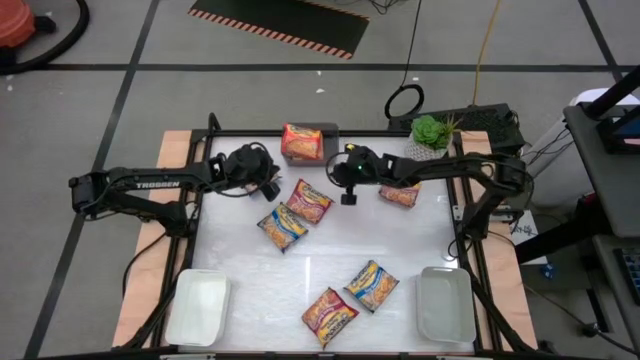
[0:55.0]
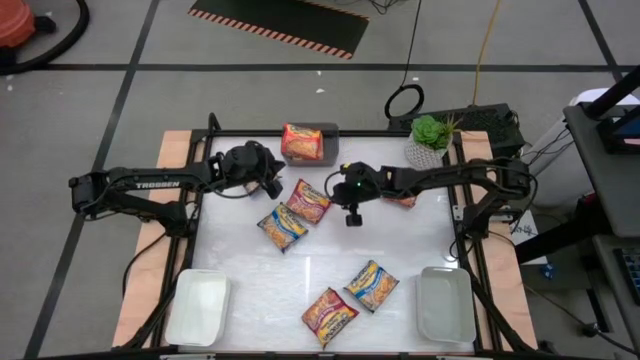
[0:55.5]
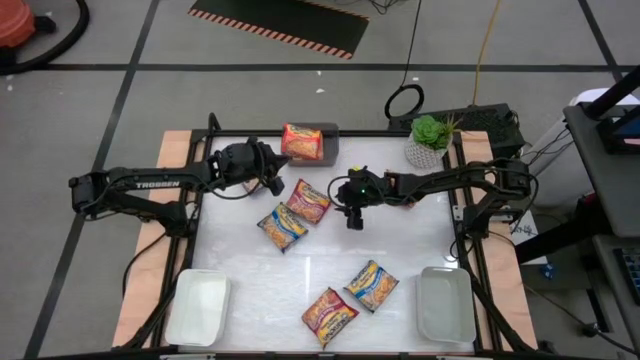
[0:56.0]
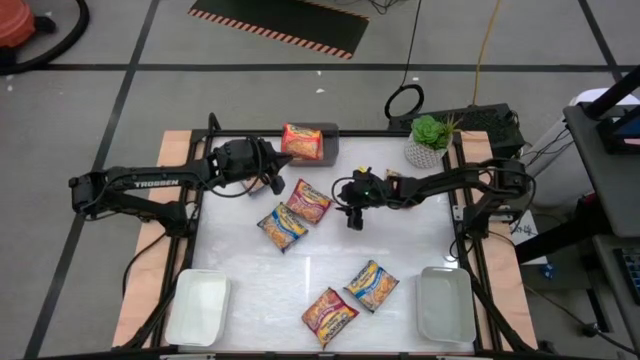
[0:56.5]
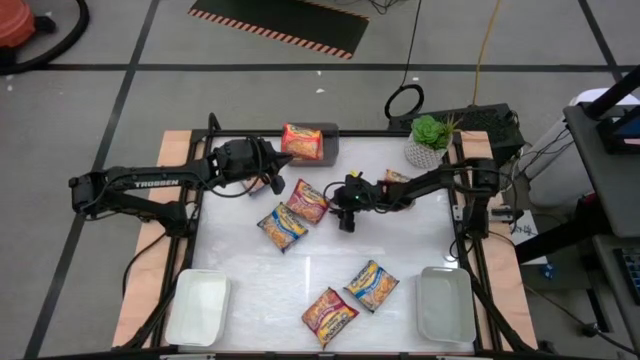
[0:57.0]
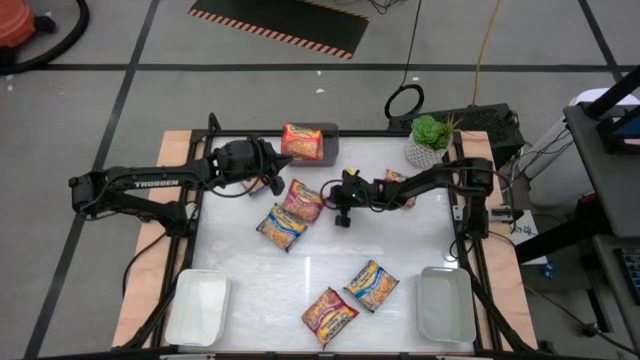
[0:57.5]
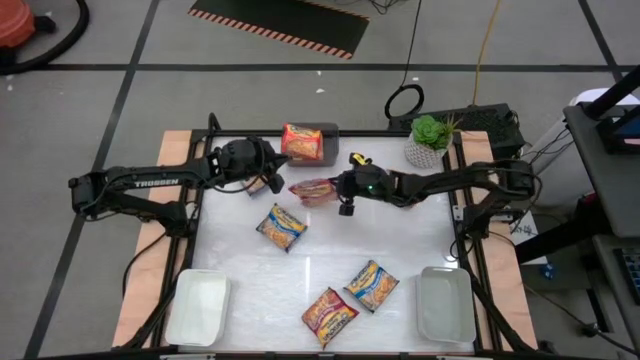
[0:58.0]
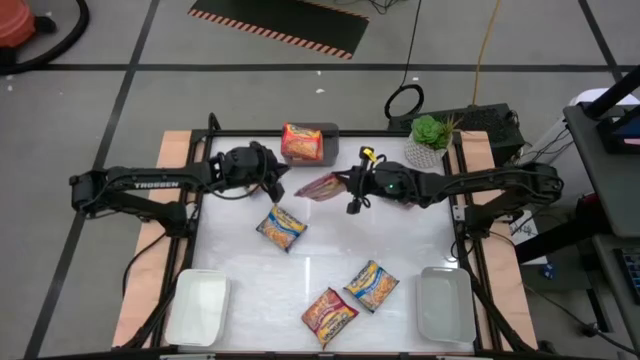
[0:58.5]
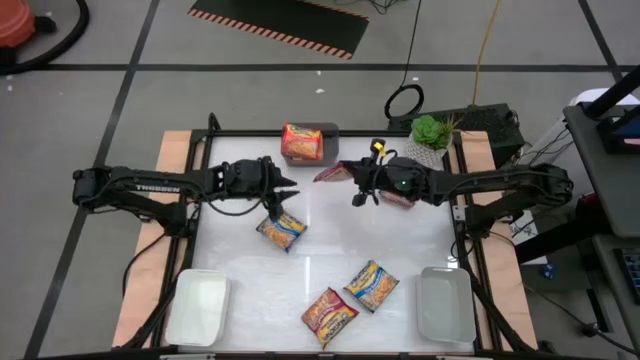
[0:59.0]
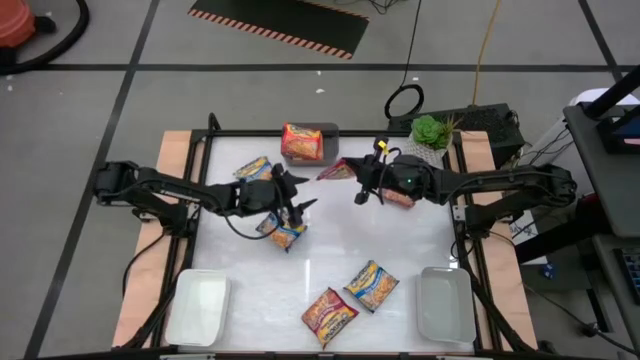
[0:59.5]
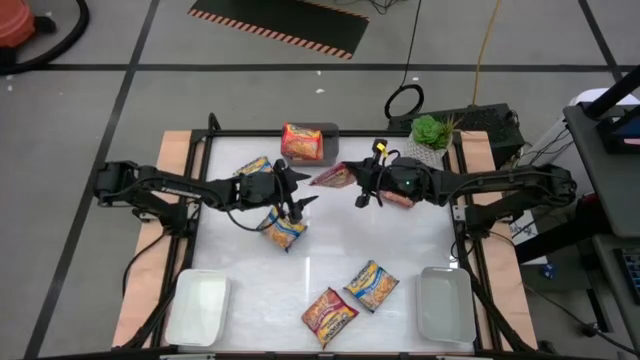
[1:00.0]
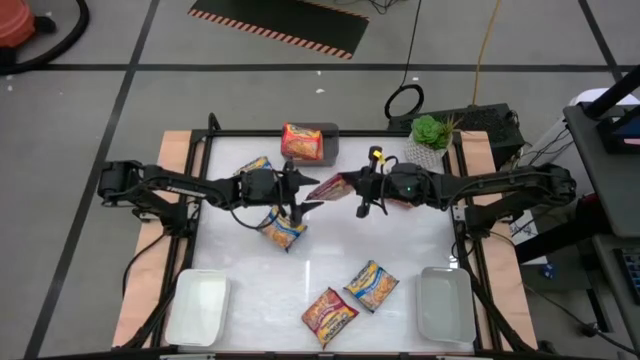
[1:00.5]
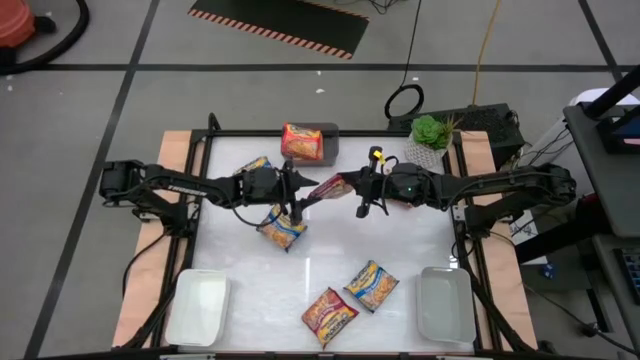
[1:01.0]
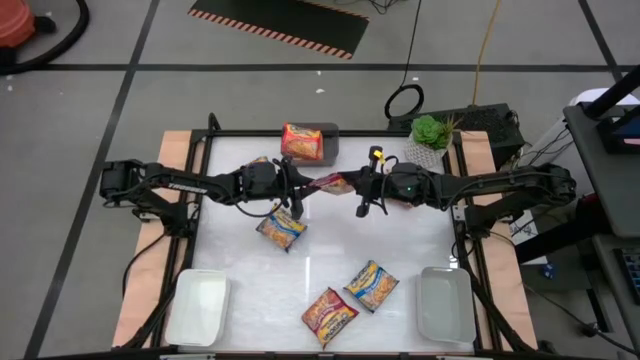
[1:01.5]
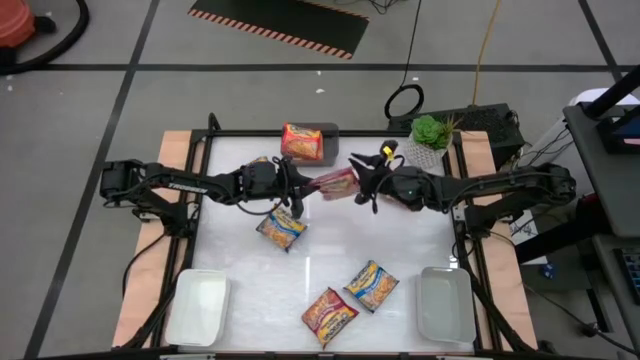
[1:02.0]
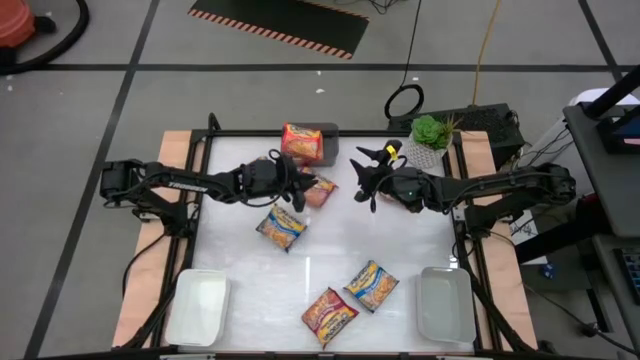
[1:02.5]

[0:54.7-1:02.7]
Task: Sort Maruchan noodles
Put the top right red noodle pack into the white bin

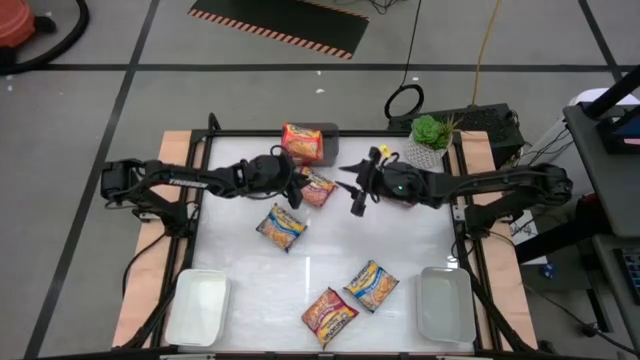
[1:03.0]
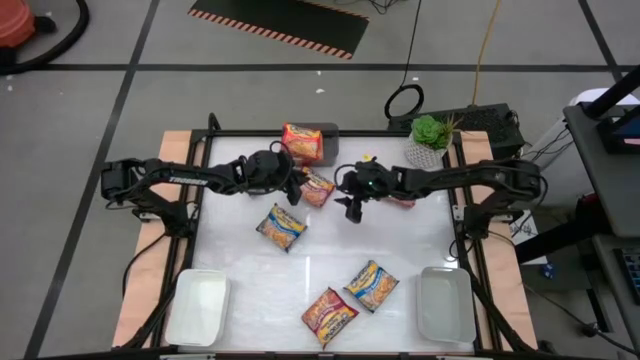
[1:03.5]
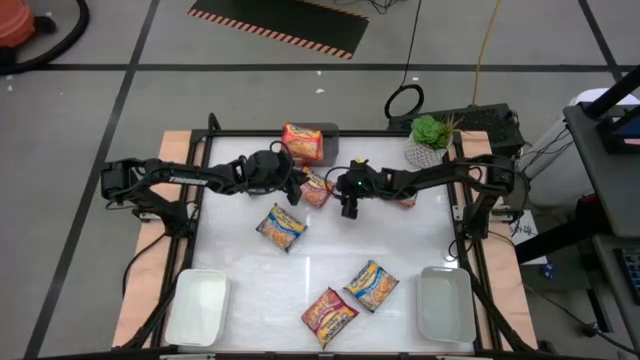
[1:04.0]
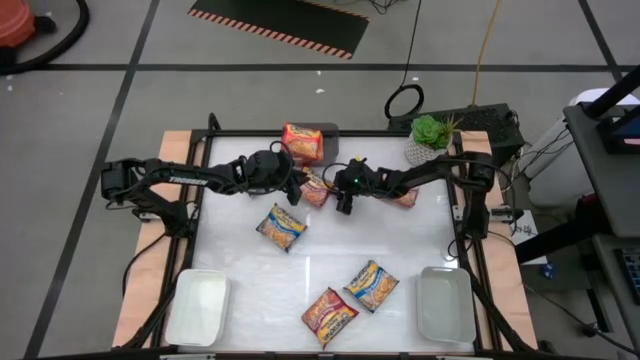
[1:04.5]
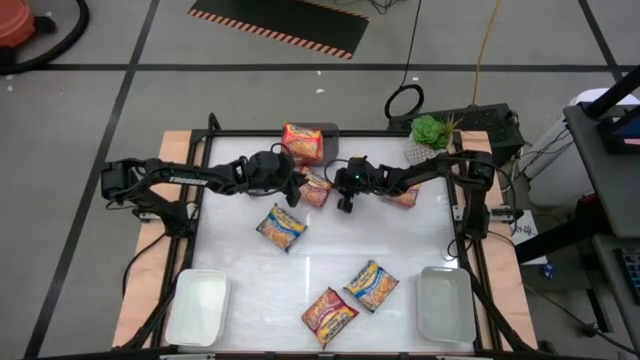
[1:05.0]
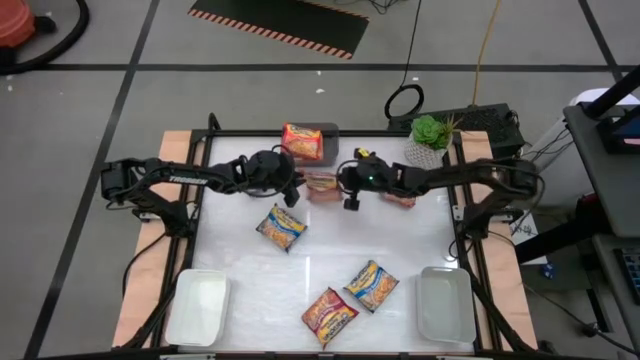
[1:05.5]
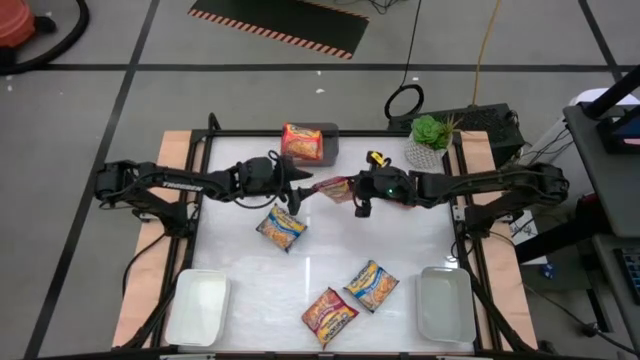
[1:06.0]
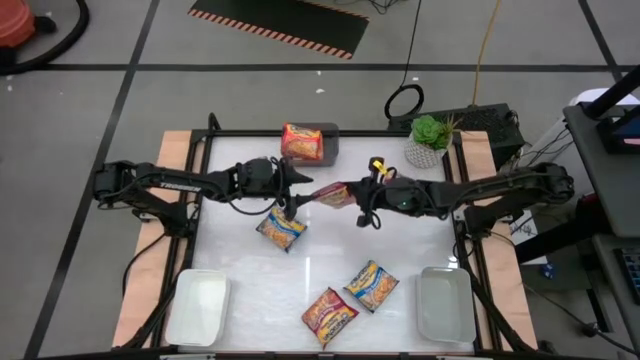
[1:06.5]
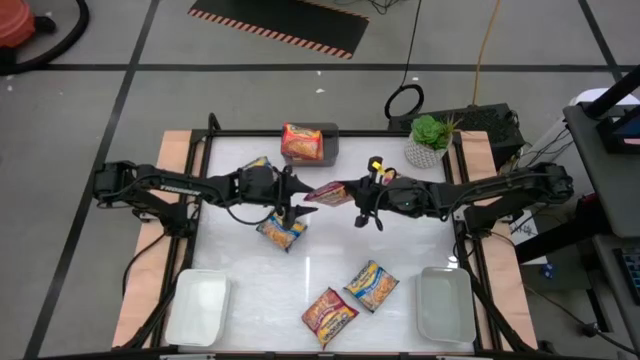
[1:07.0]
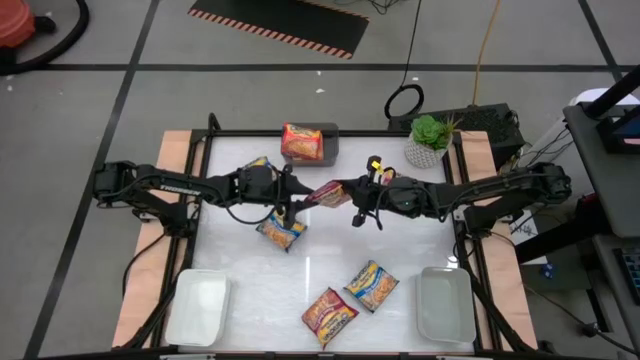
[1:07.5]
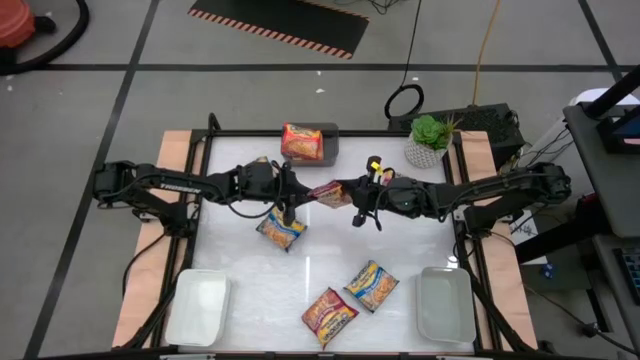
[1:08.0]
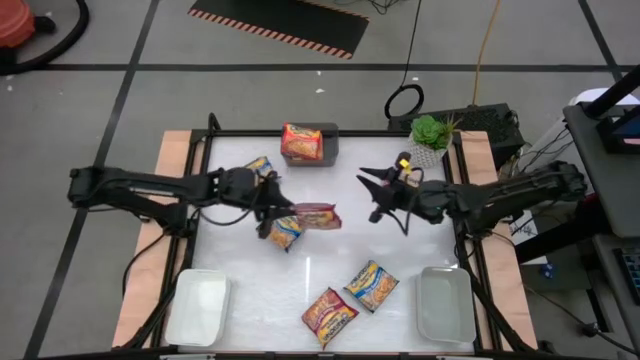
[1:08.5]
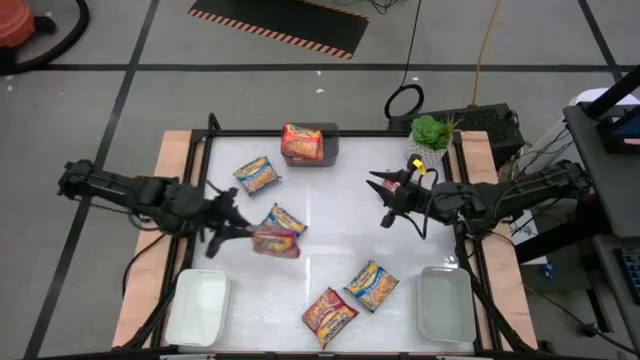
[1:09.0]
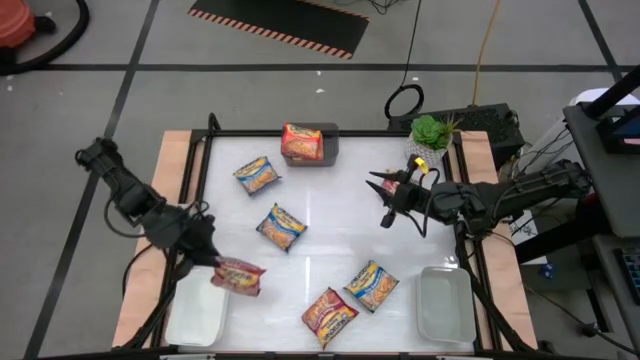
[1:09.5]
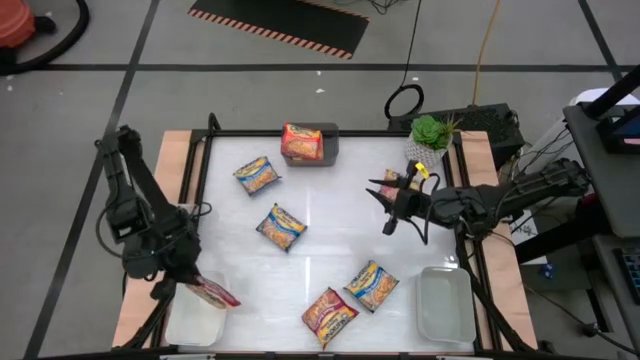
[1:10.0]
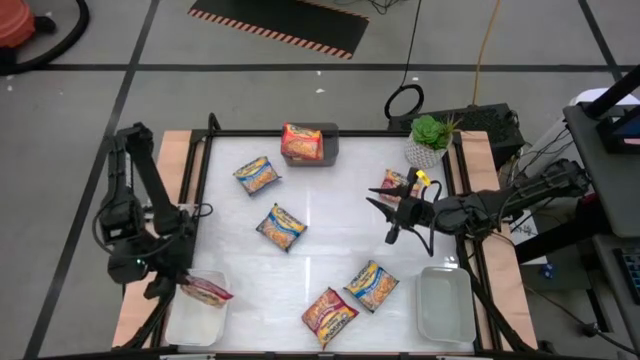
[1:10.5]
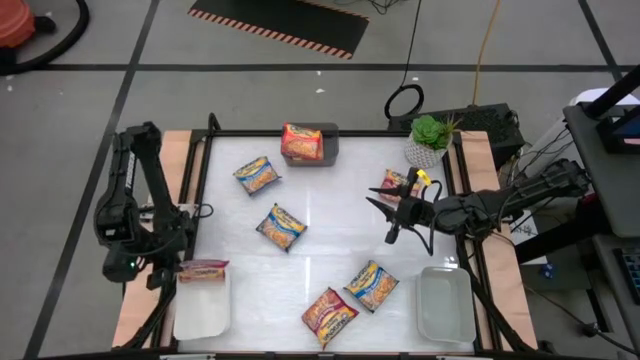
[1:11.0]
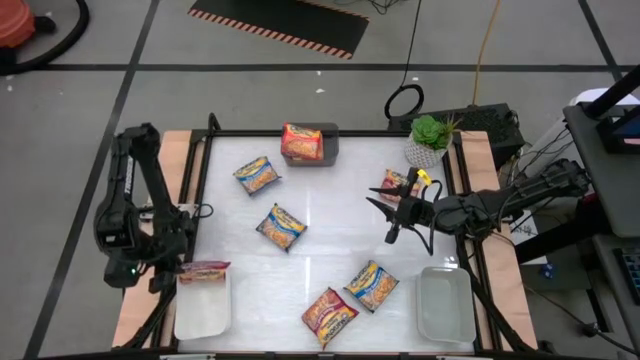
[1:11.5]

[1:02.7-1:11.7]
Put the top right red noodle pack into the white bin

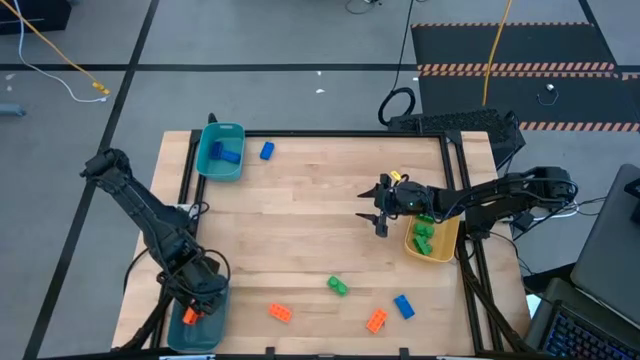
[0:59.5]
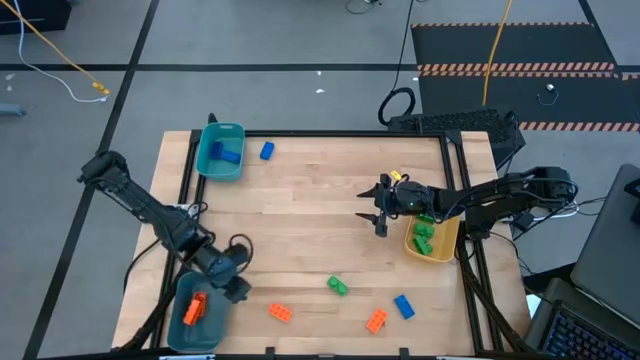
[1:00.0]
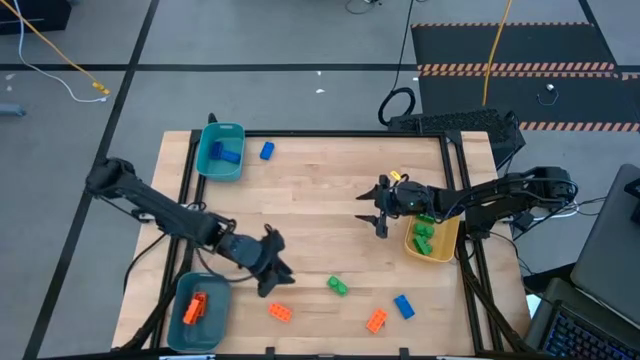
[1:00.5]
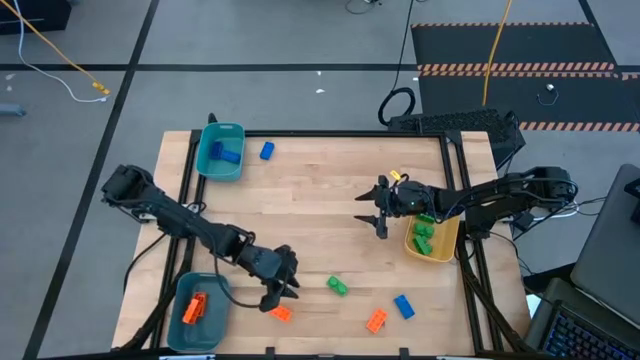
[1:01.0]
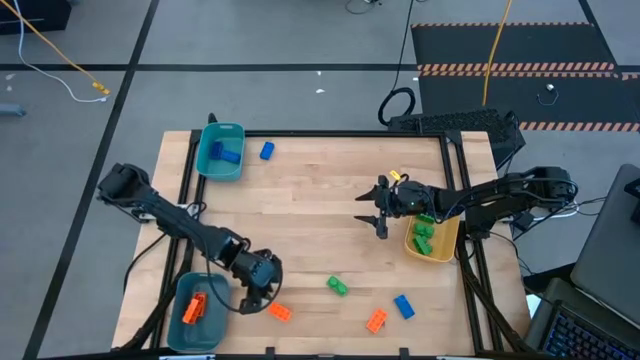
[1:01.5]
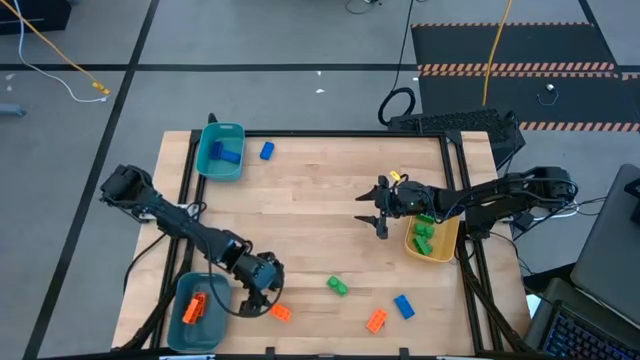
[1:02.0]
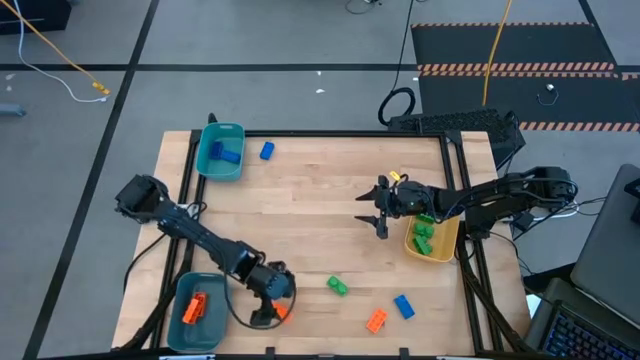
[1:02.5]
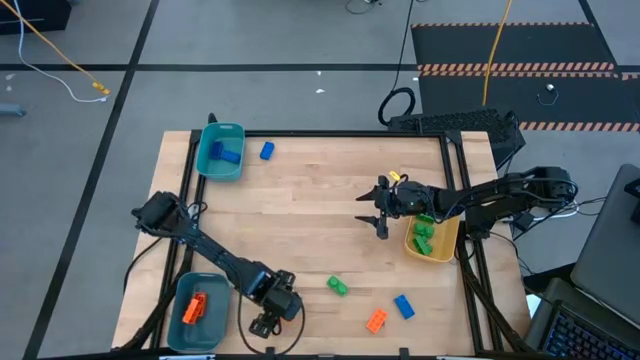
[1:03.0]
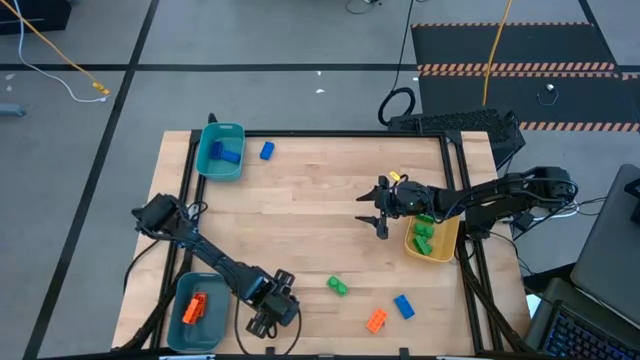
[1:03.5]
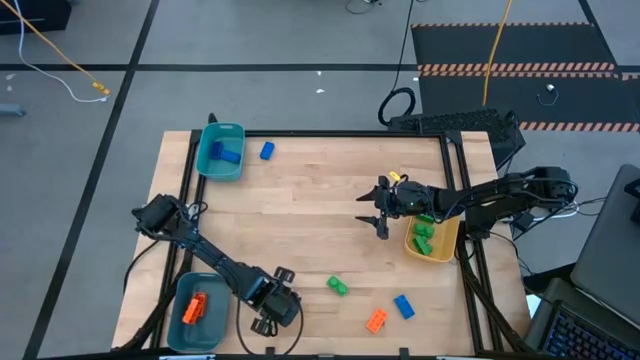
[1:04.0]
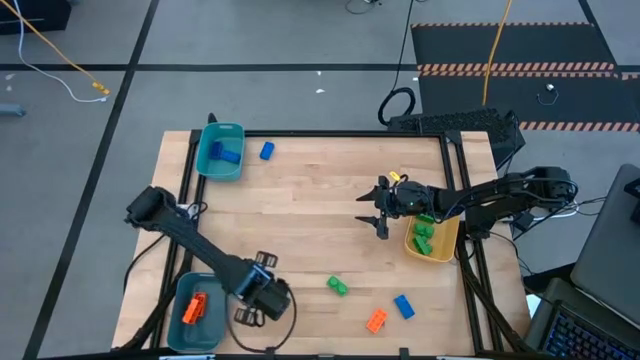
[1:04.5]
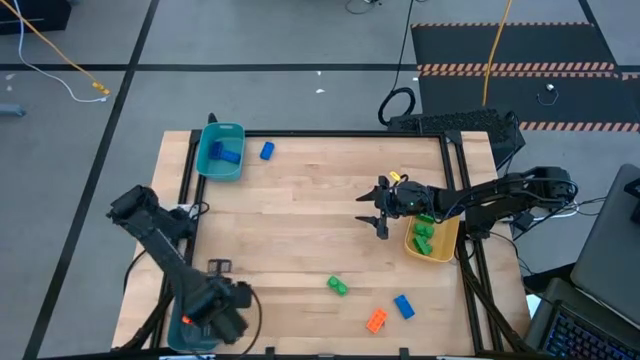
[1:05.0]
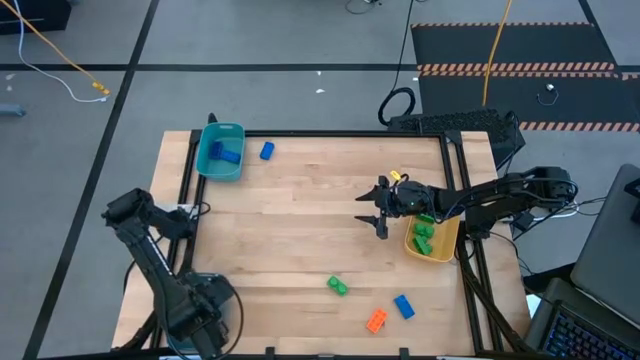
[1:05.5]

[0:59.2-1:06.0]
Task: Sort & place blocks by color
Put the orange game piece into the dark blue bin
